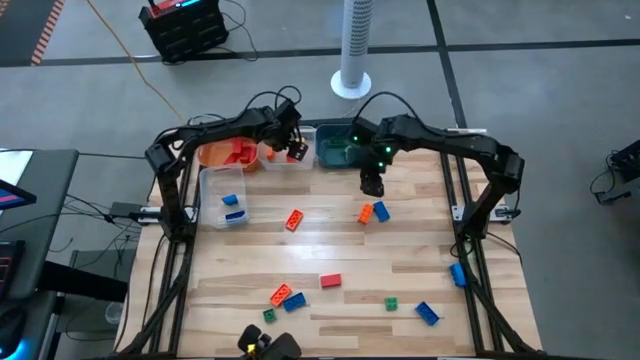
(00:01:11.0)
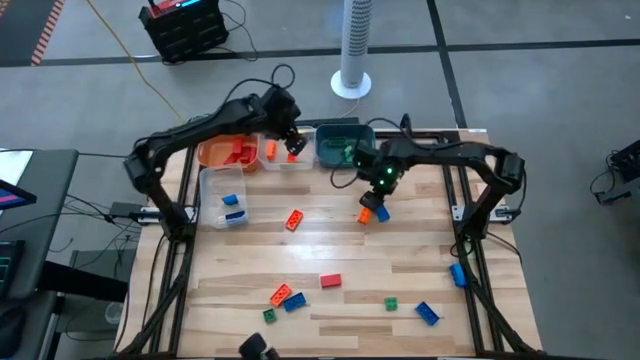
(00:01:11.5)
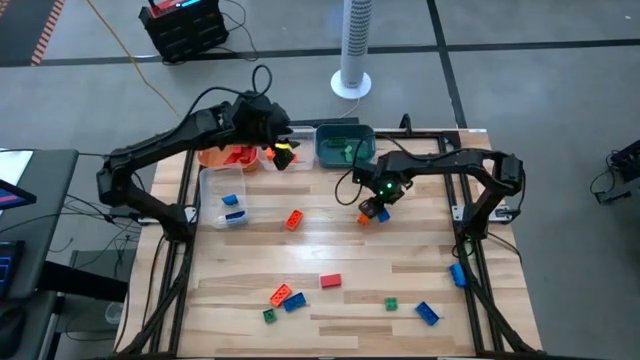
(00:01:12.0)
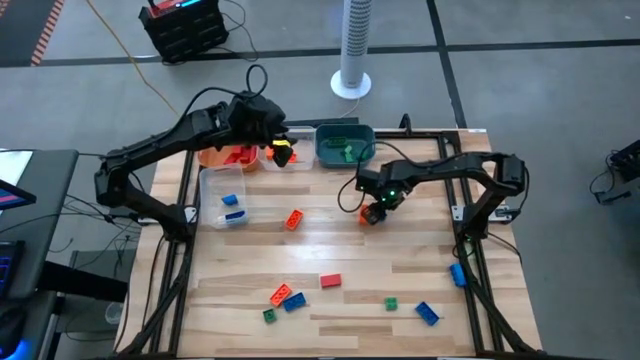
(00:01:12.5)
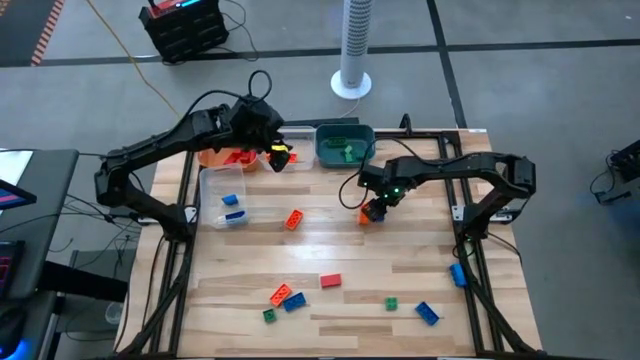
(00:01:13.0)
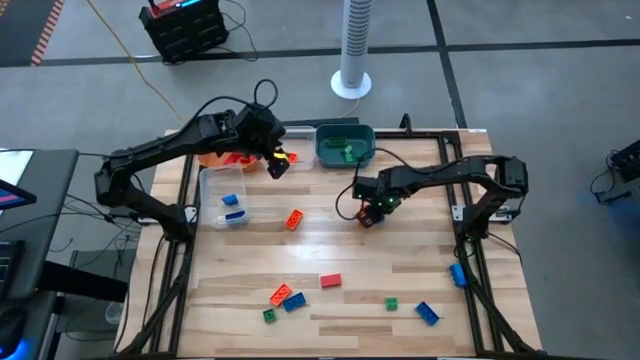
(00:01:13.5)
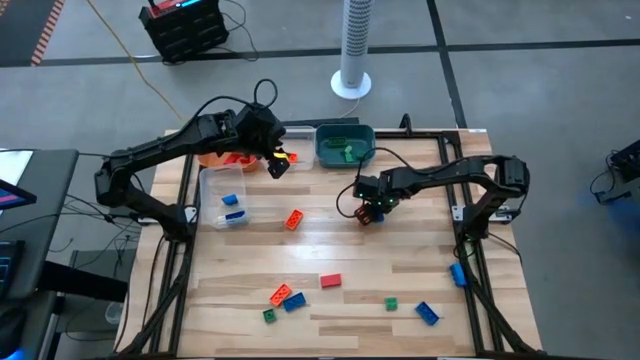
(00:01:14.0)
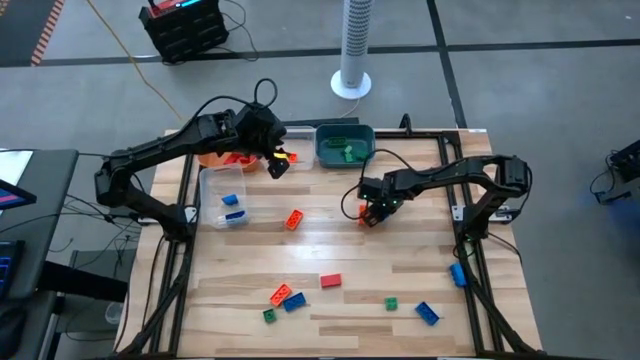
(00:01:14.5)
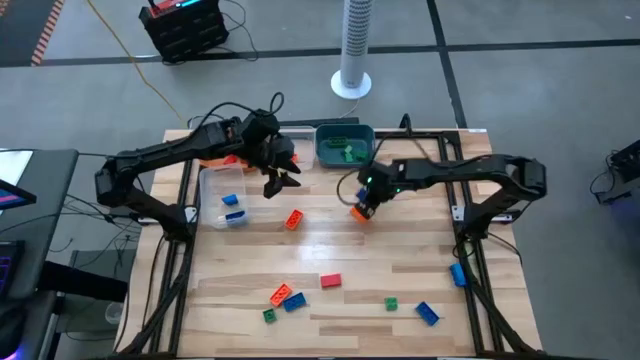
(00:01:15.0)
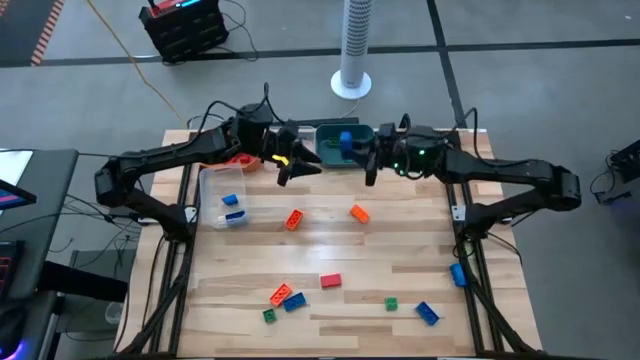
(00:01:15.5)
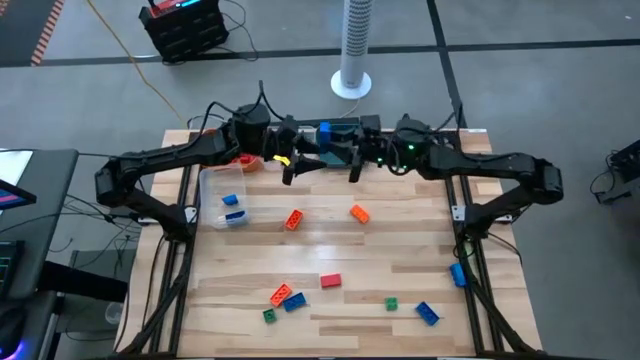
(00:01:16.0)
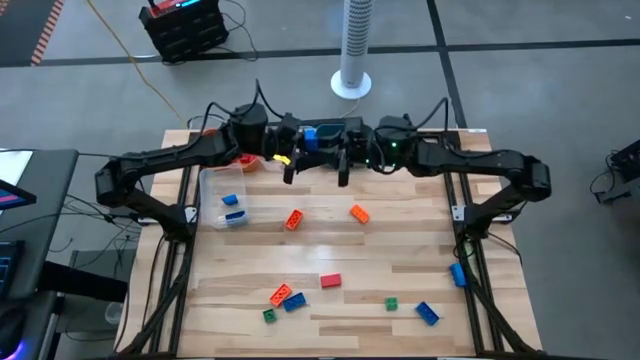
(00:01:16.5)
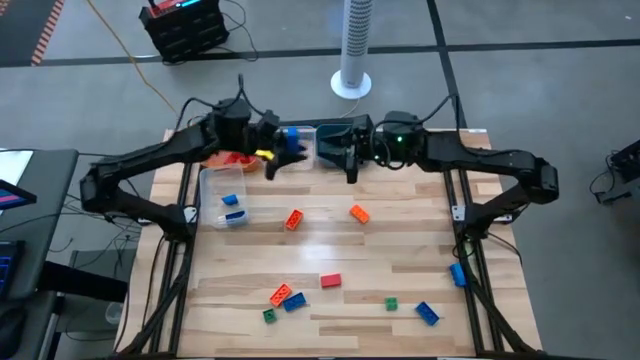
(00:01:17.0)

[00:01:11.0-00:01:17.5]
Task: Sort blocks
Put the blue game piece into the bottom transparent bin

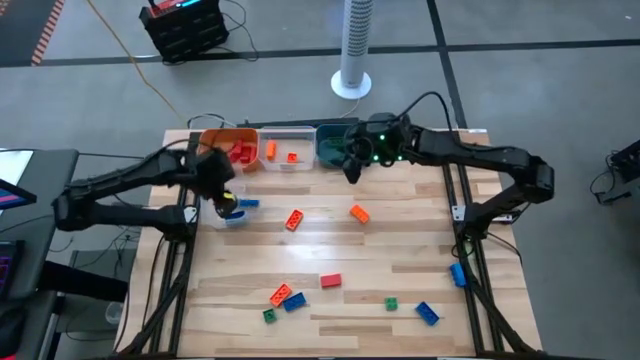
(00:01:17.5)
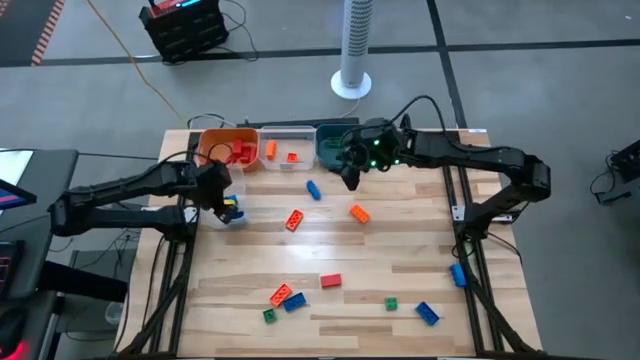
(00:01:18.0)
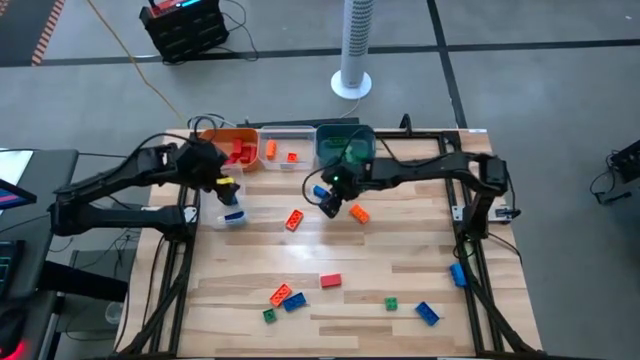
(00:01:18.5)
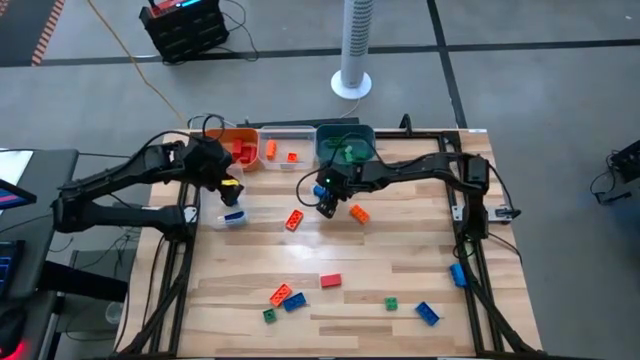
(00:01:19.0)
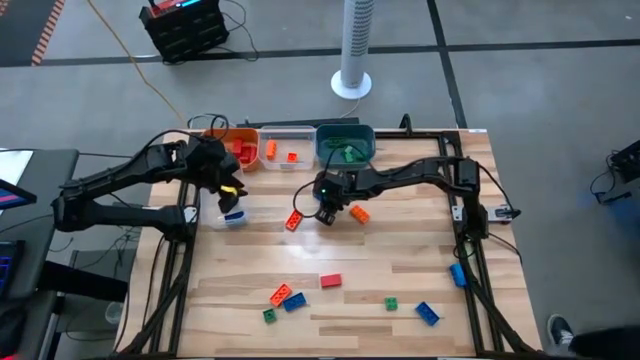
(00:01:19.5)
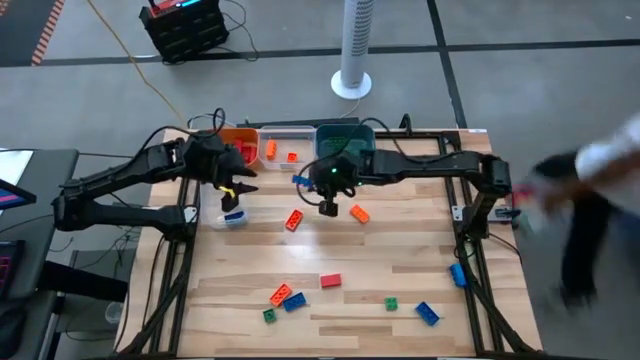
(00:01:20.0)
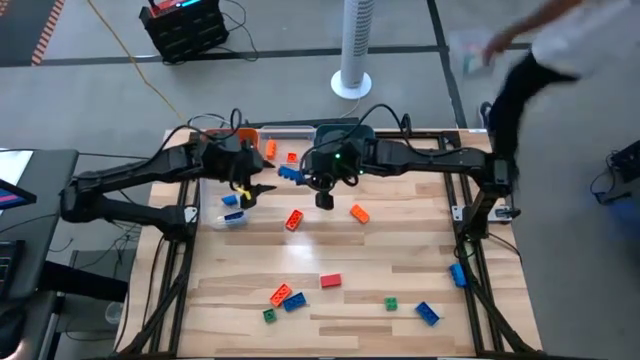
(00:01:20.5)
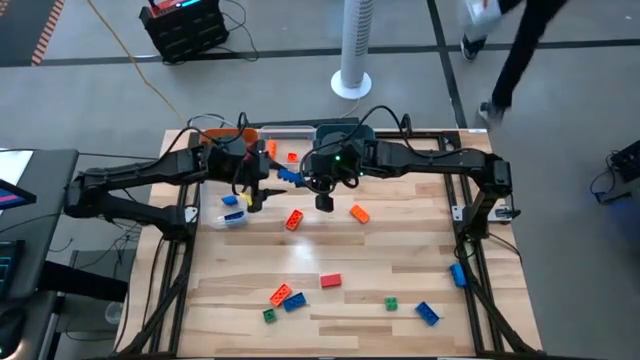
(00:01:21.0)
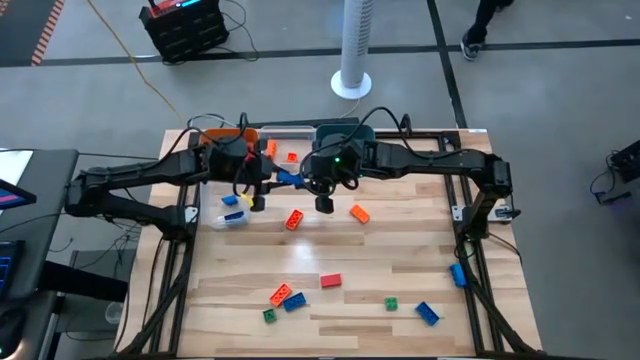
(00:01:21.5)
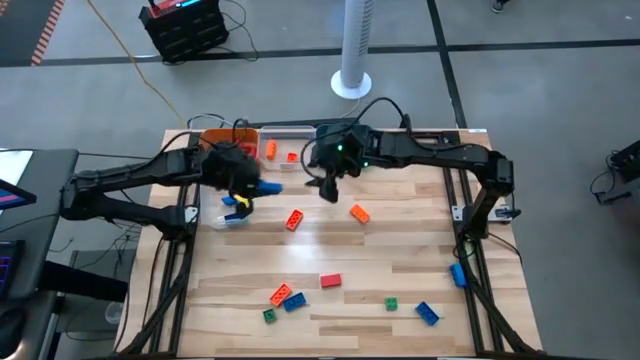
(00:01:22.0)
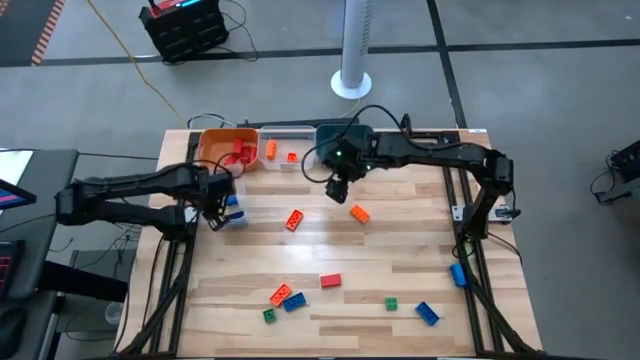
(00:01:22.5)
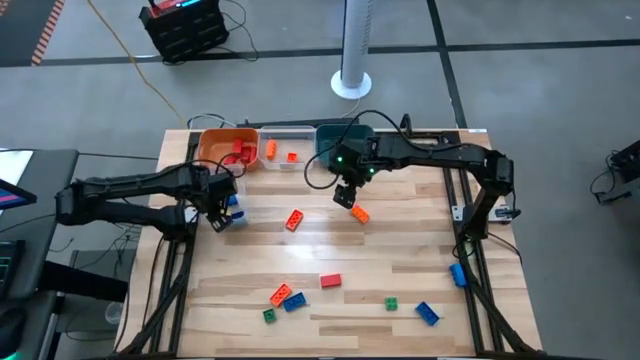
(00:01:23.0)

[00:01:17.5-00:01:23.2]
Put the blue game piece into the bottom transparent bin

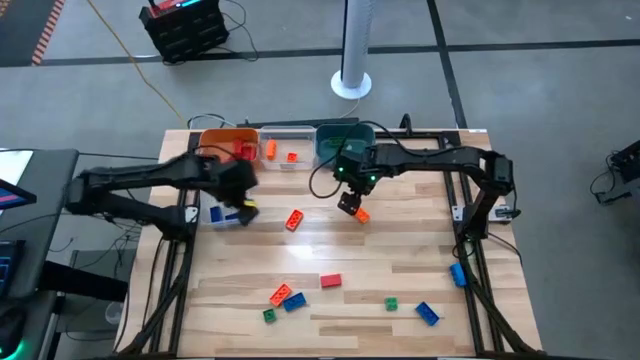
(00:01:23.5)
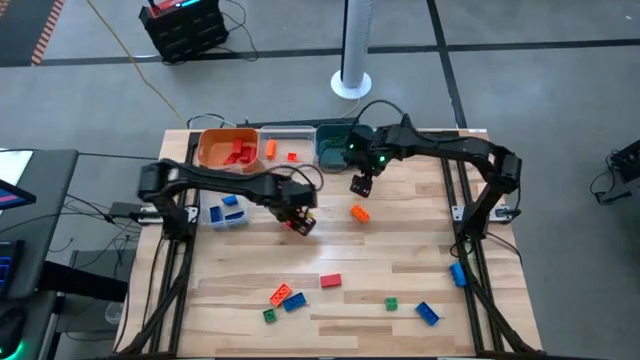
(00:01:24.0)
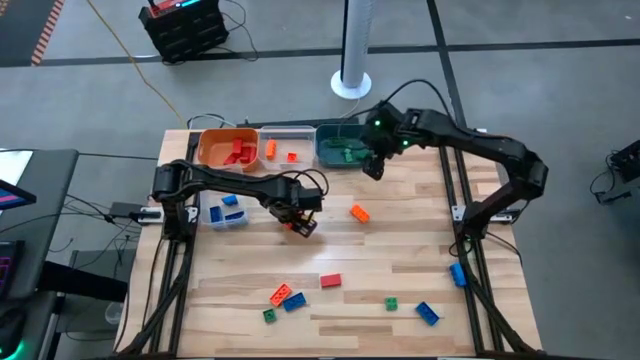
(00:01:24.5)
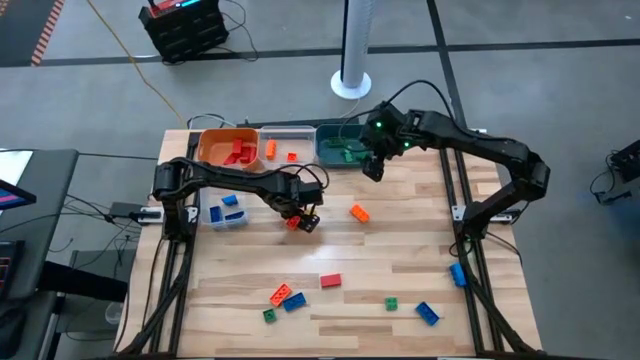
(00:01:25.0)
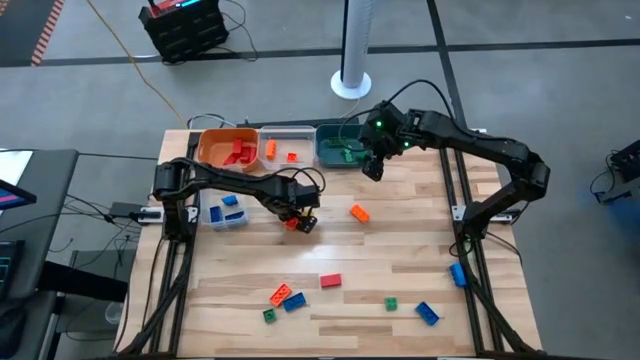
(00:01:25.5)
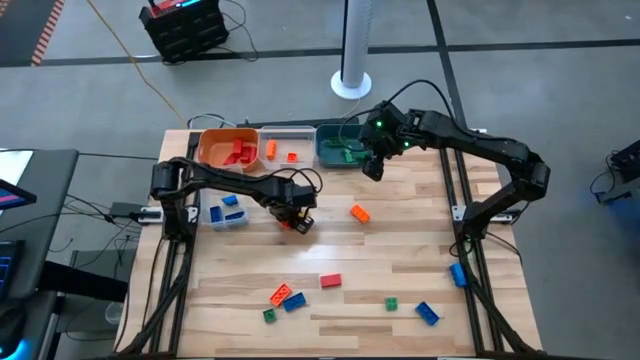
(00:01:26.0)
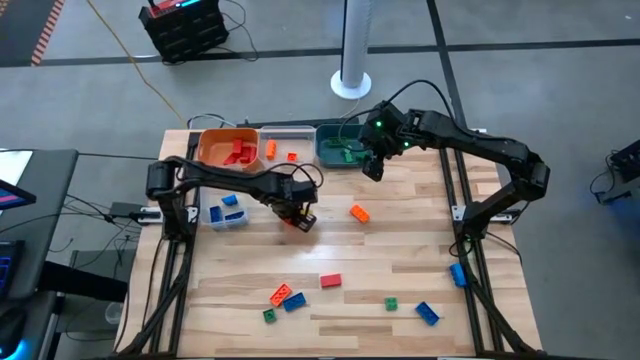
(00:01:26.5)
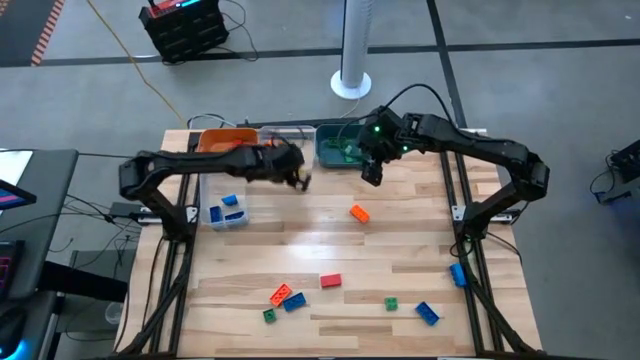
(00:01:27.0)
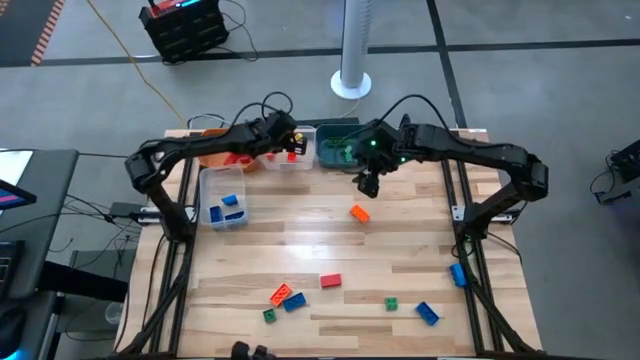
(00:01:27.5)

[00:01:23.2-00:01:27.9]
Put the orange game piece into the top transparent bin

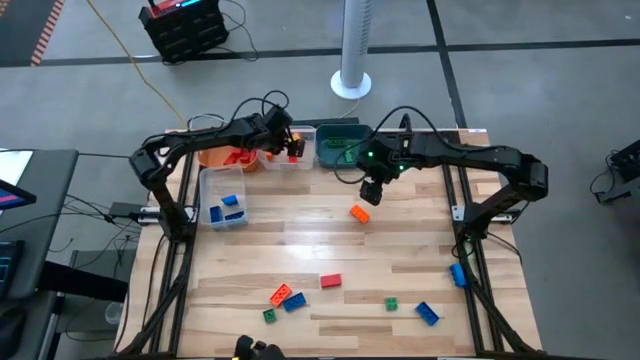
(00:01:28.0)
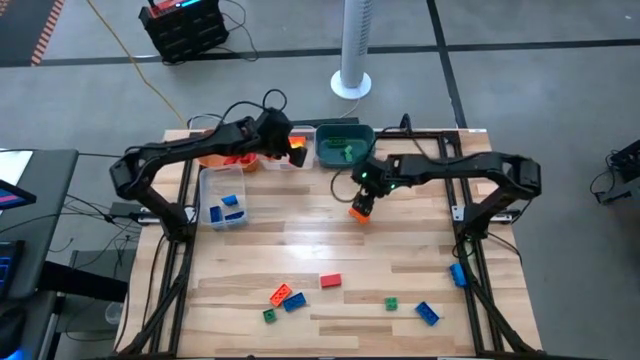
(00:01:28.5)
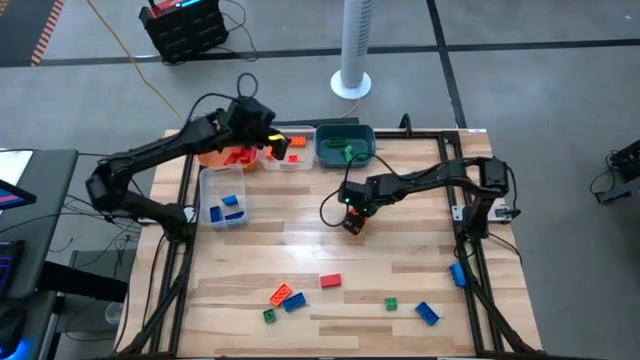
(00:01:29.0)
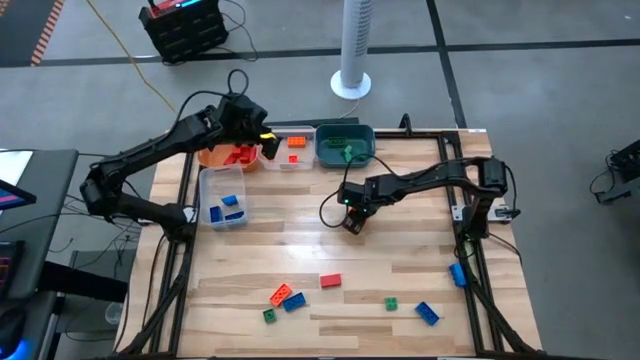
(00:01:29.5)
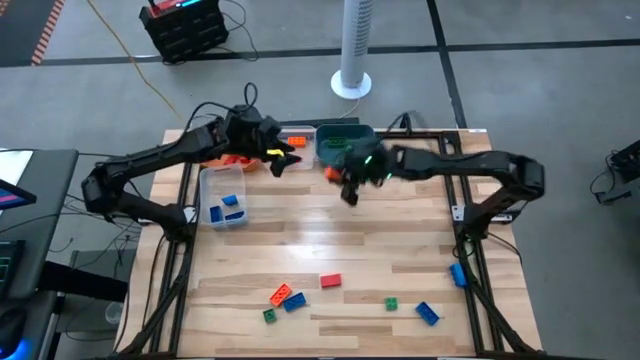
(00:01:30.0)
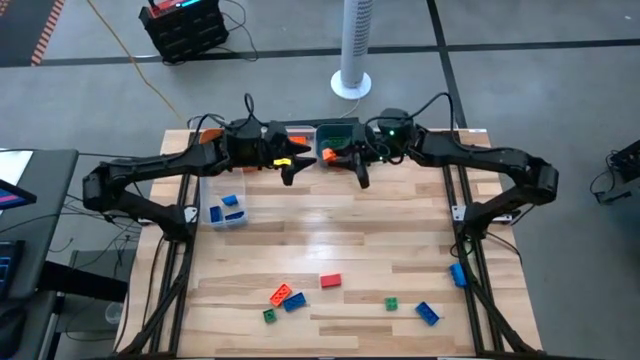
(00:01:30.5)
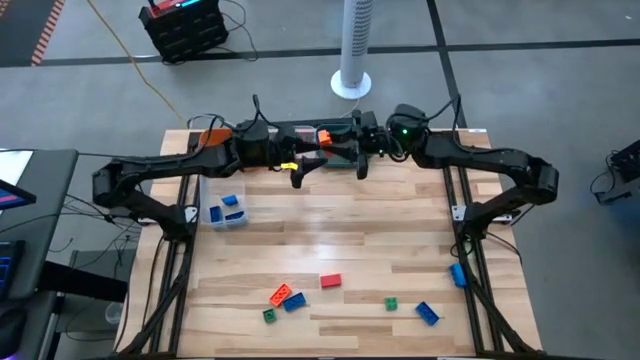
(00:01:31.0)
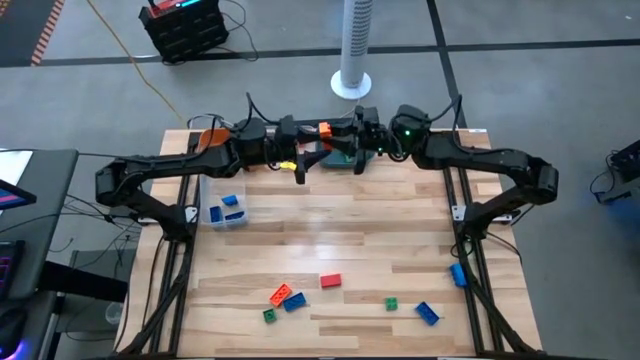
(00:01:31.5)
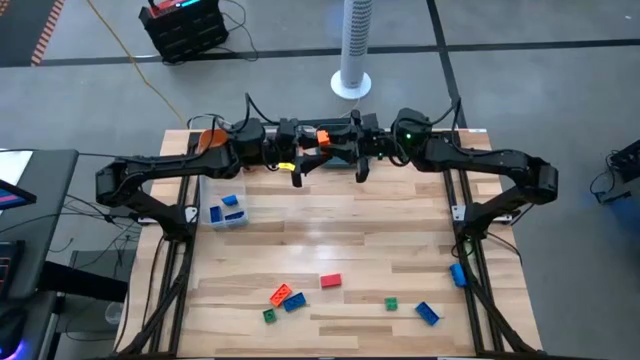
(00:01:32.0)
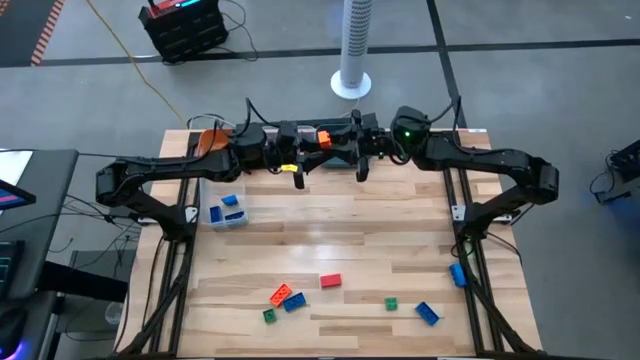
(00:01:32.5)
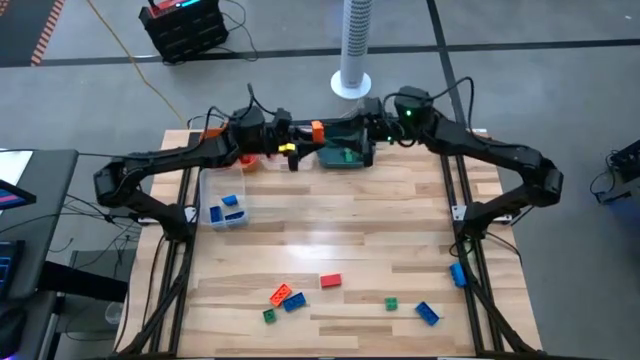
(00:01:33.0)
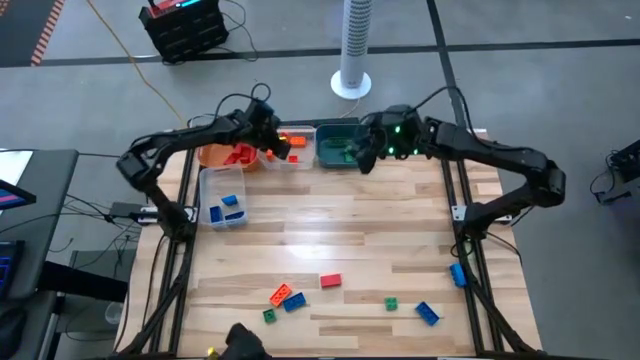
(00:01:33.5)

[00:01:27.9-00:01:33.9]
Put the orange game piece into the top transparent bin
